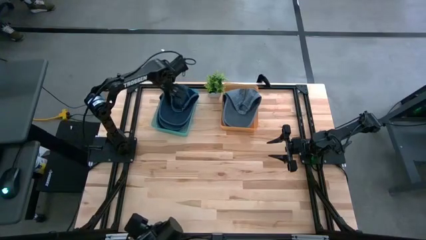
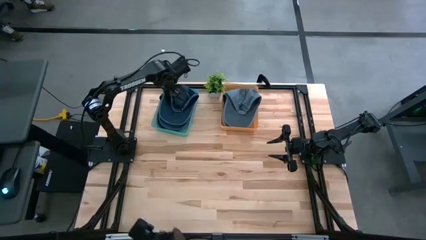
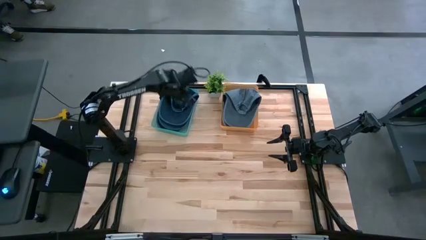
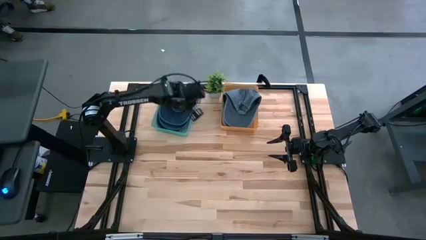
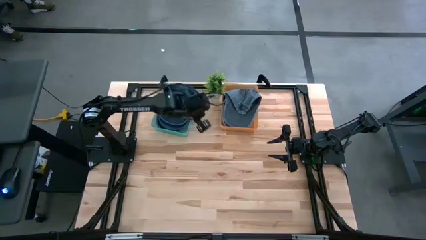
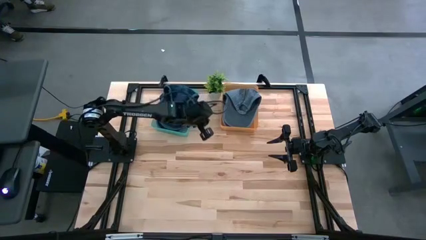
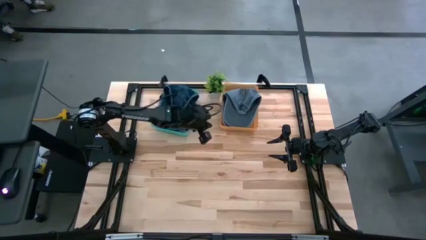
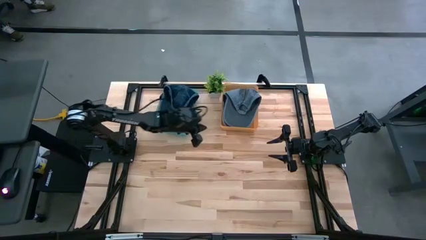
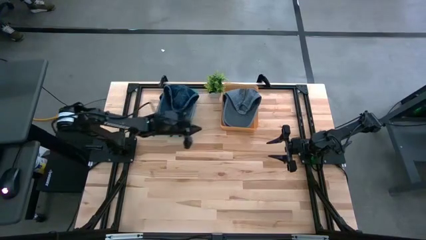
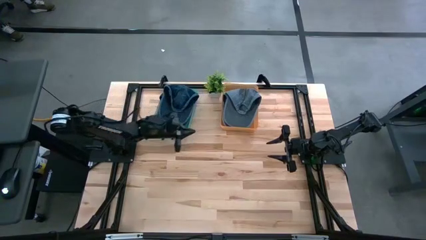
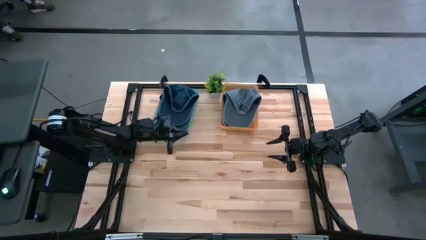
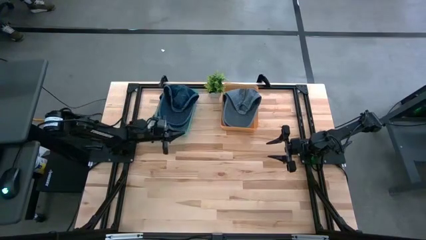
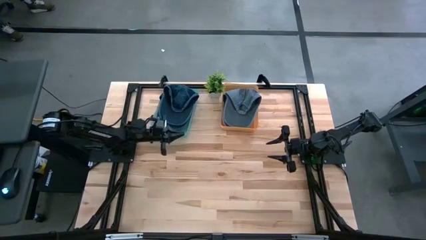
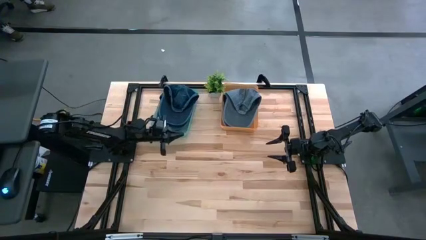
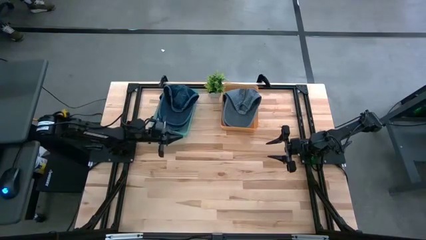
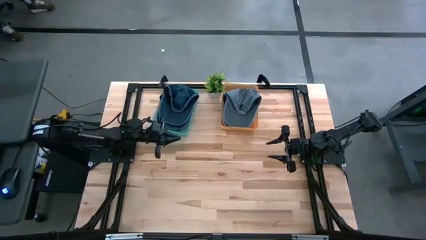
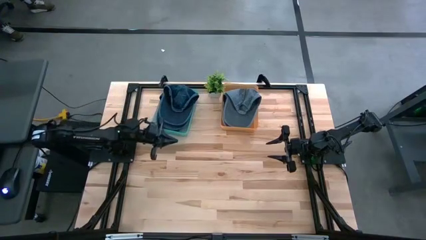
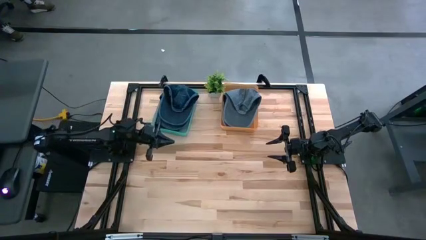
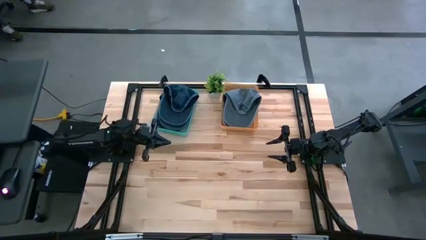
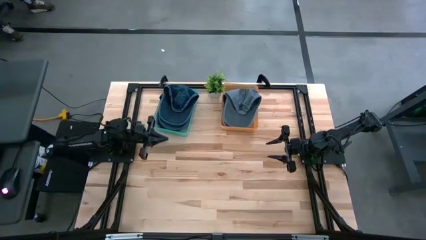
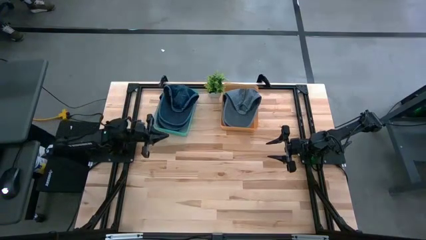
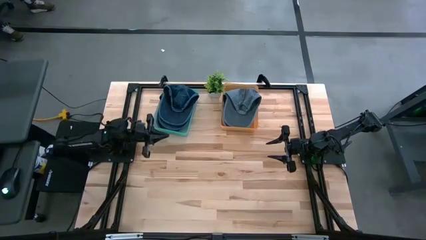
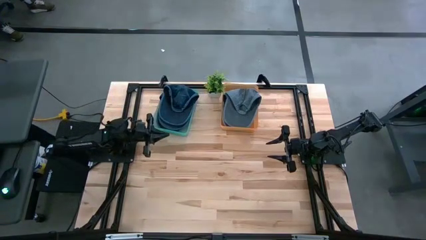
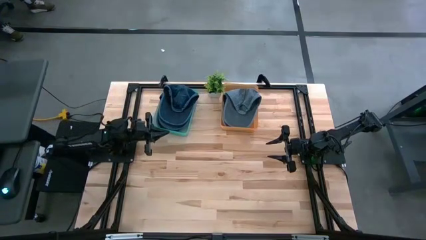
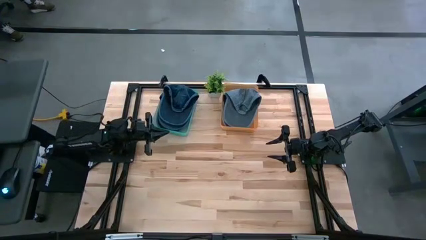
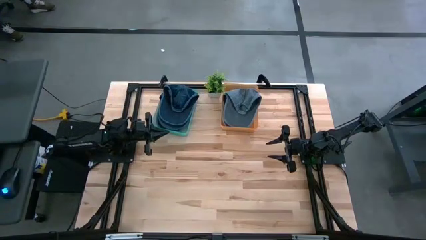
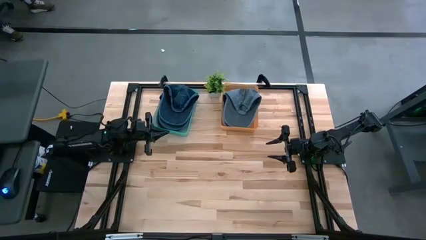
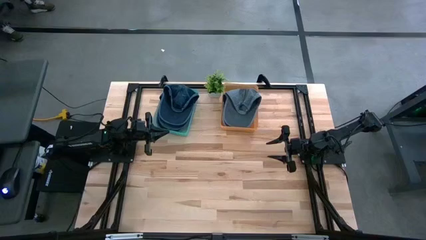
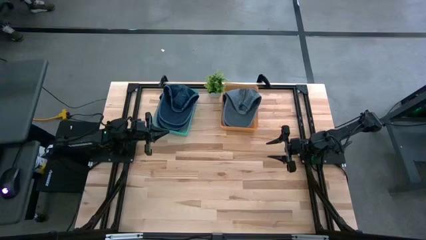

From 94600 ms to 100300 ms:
Task: Pick & Place hat
Return to Home Position

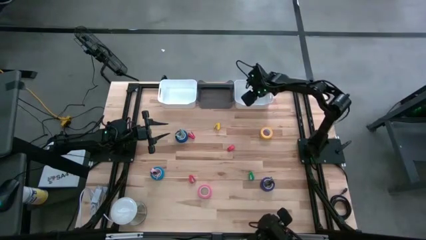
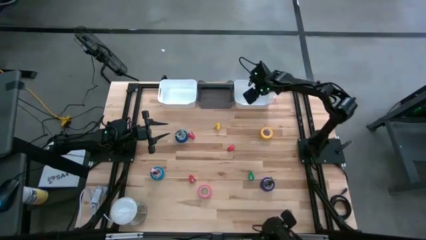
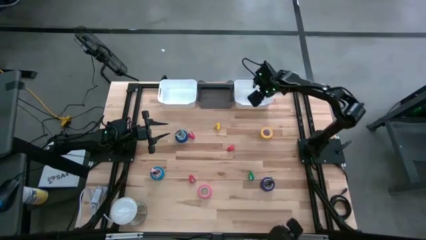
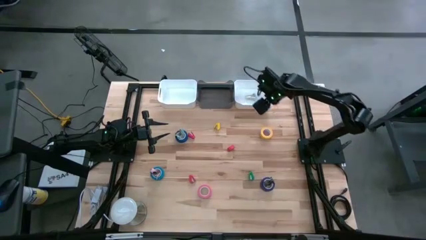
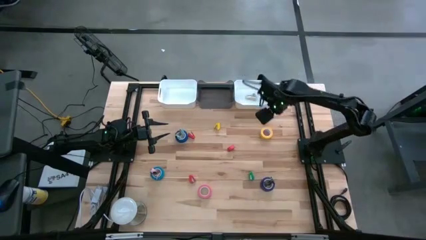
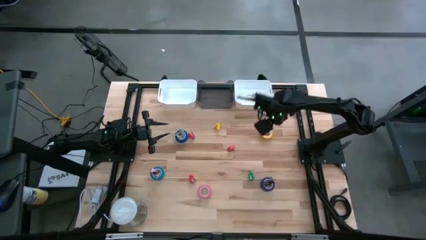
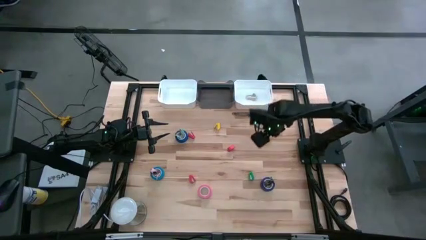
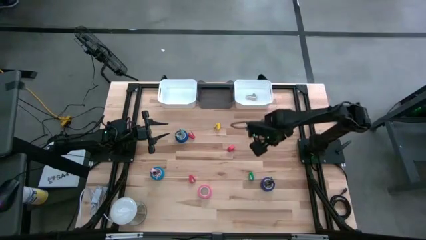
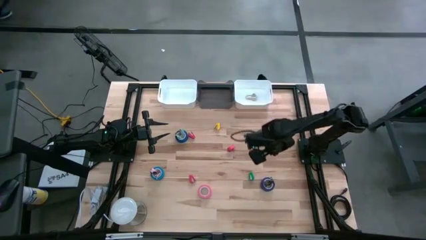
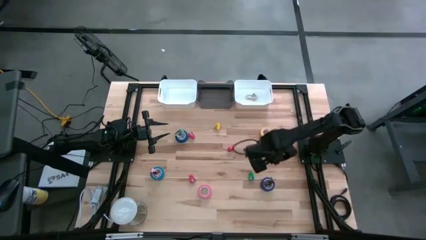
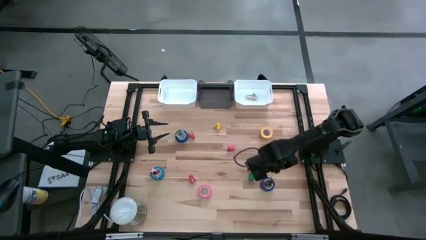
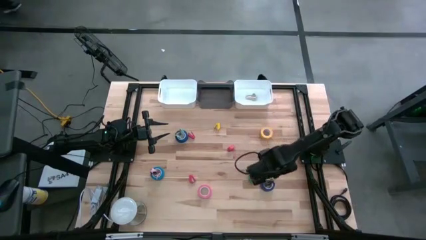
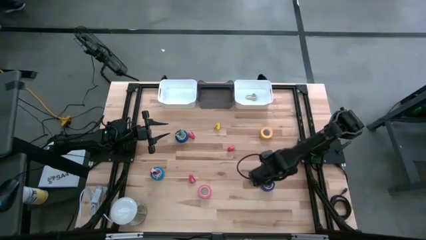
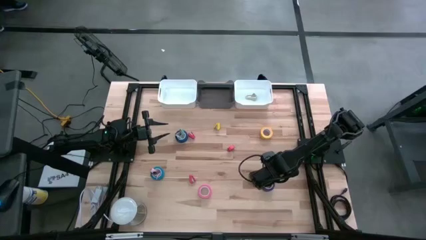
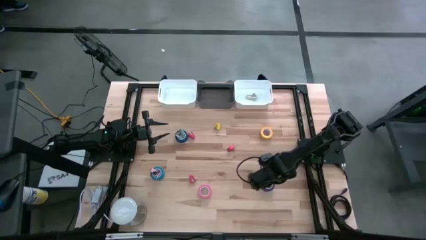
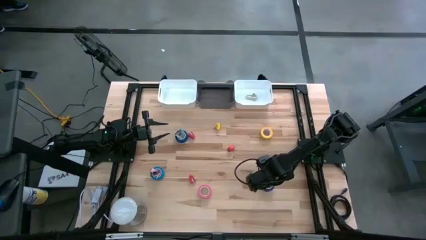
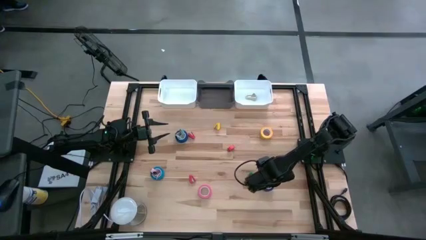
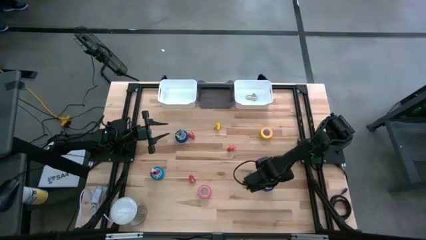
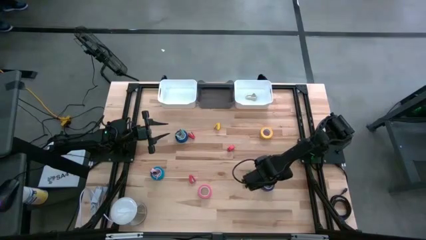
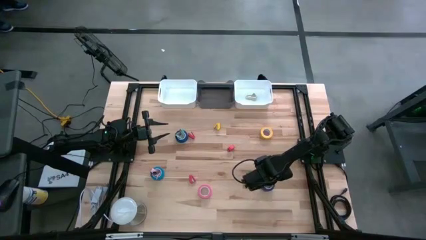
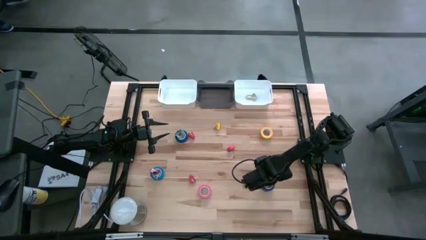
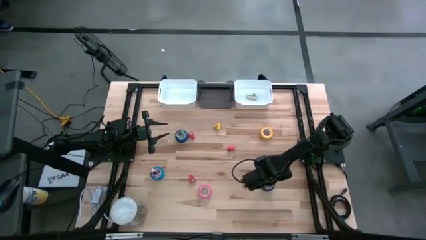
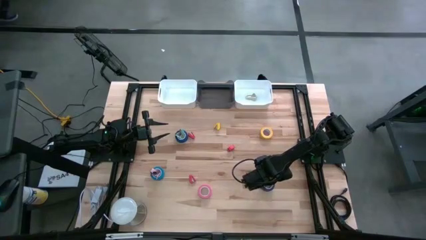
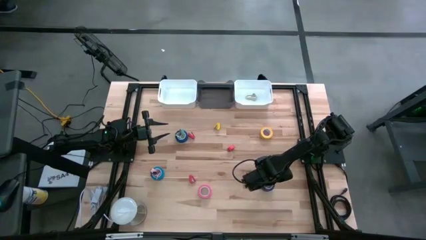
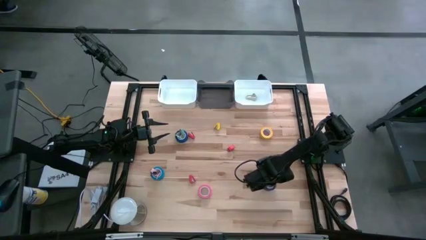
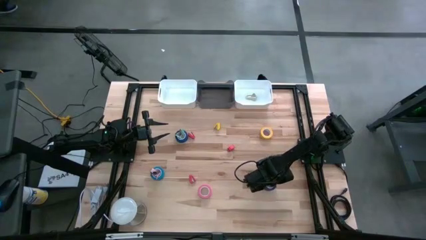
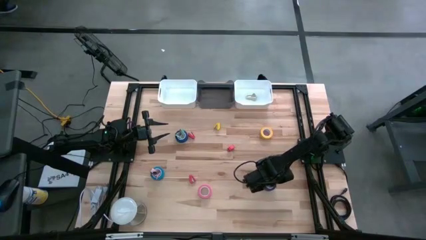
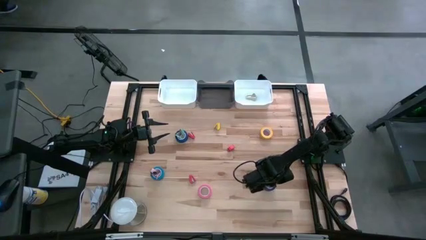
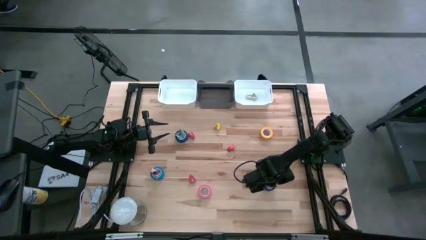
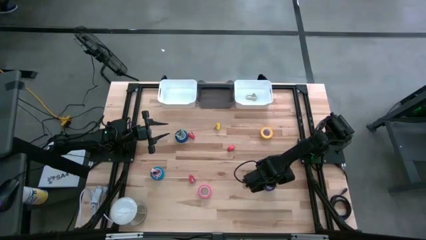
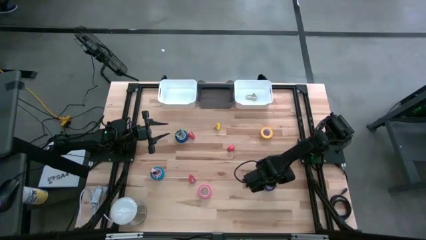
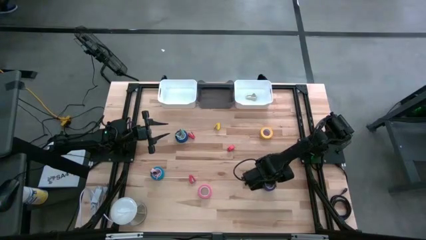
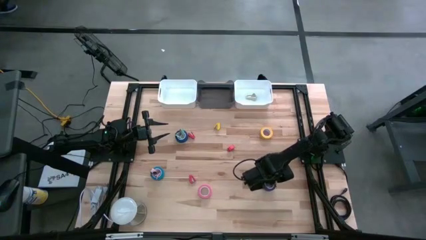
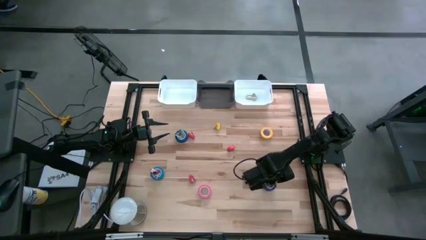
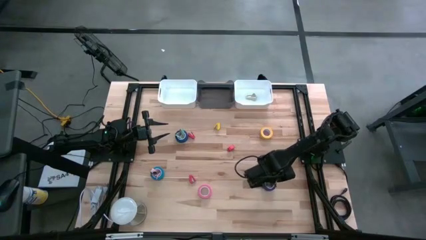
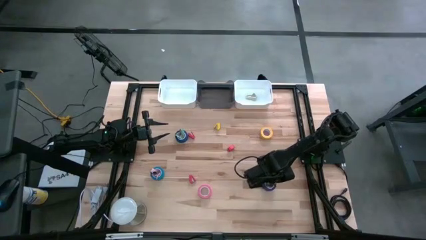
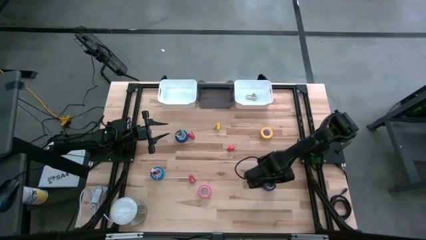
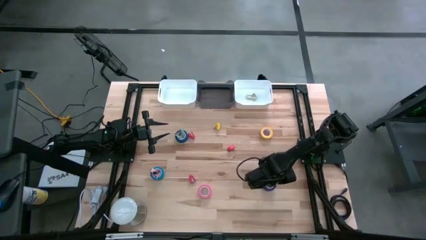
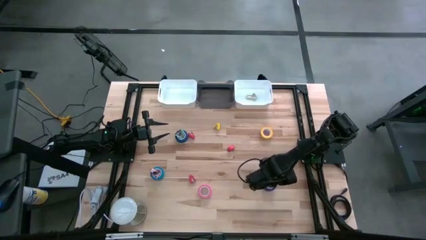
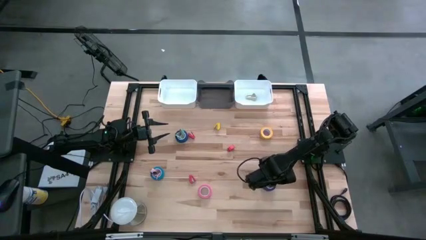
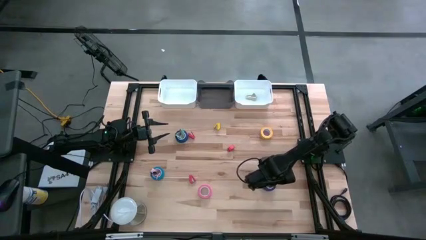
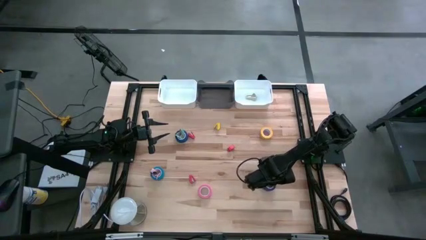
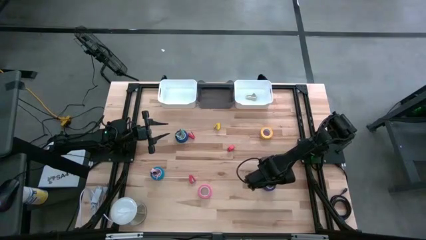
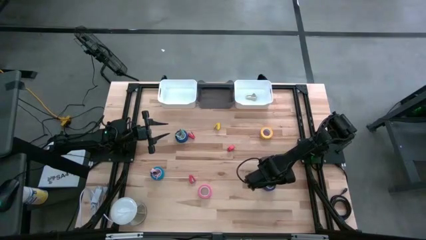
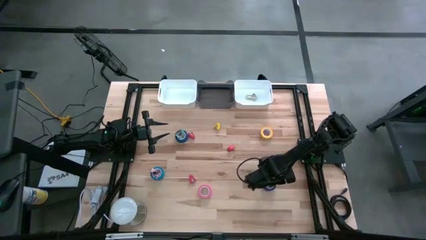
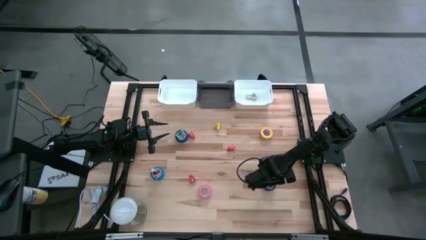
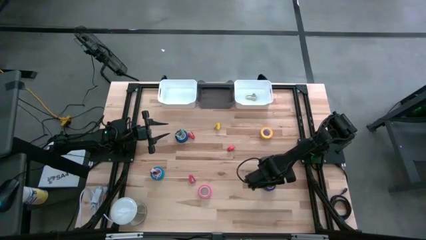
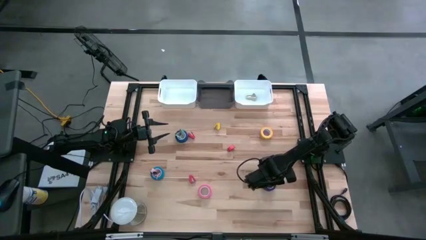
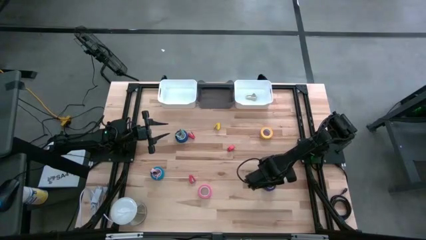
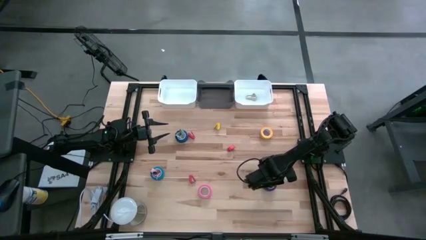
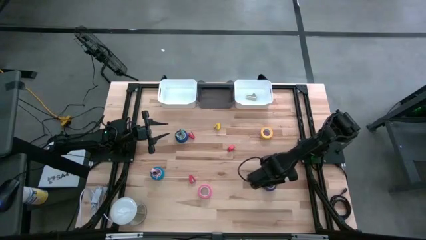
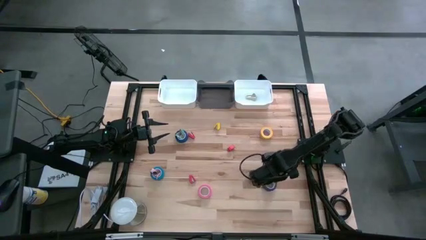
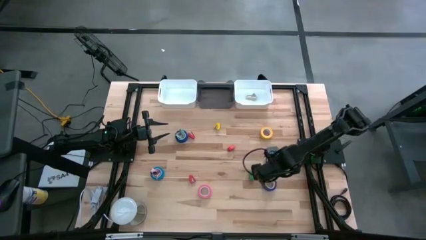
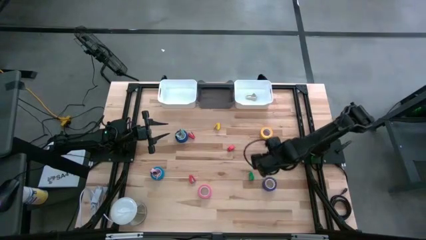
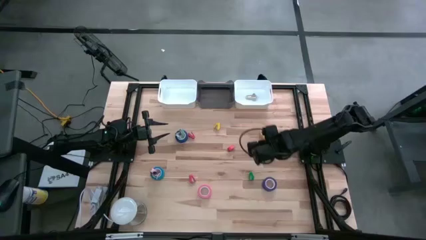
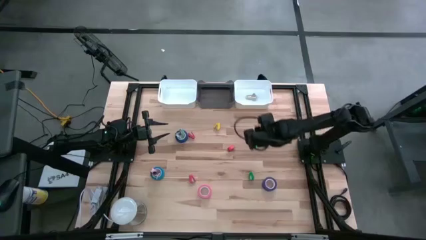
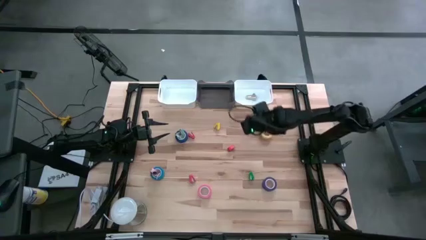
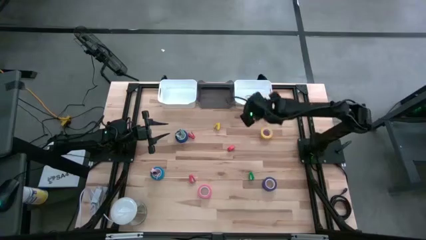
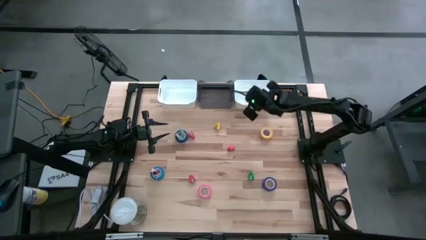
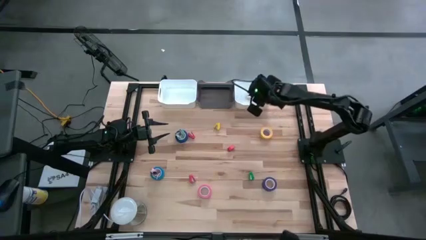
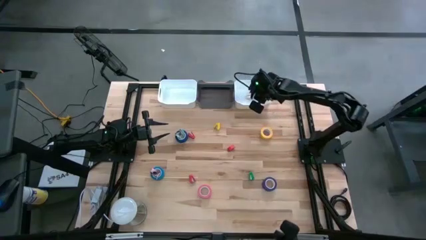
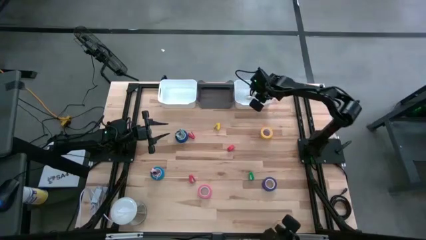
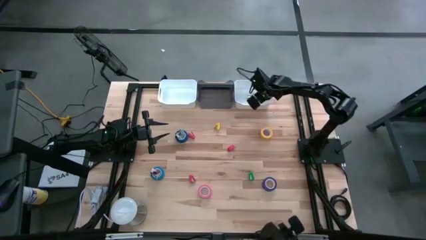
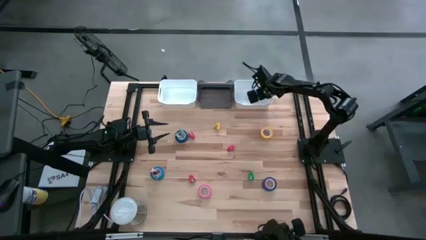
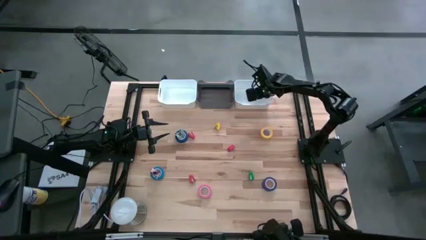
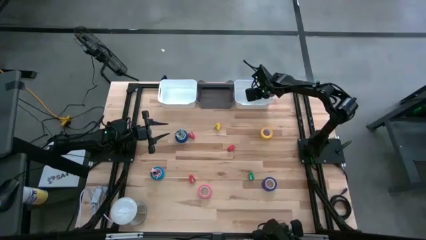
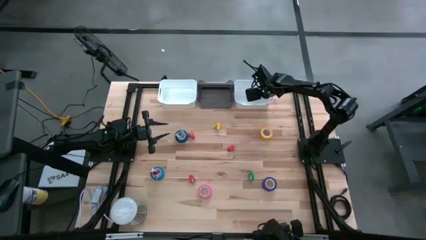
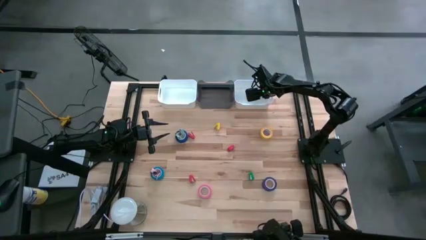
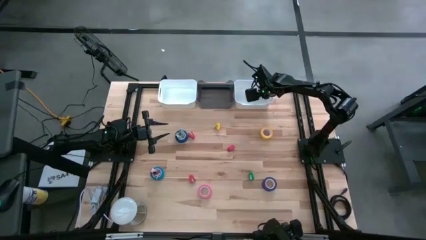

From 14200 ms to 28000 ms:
Task: Pick and place Stapler, Stapler remover, tape
Put the black staple remover into the right white bin
